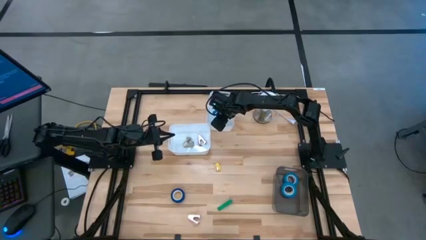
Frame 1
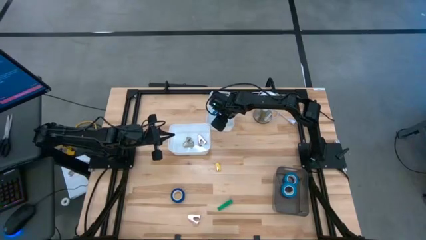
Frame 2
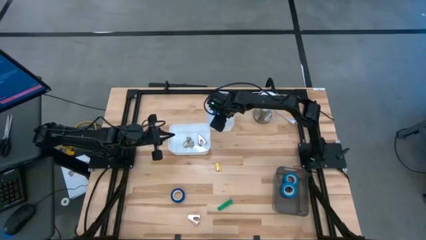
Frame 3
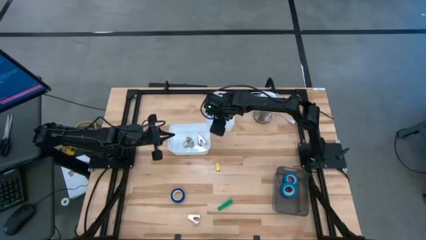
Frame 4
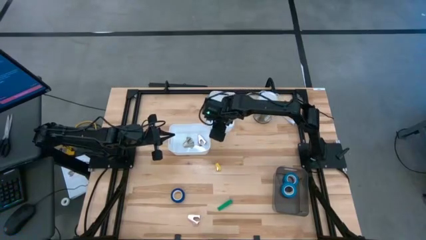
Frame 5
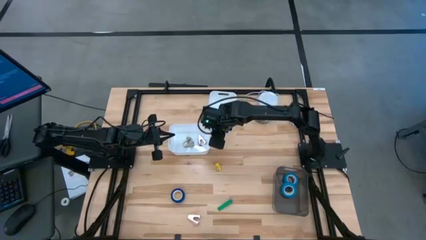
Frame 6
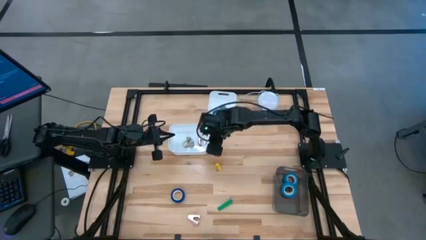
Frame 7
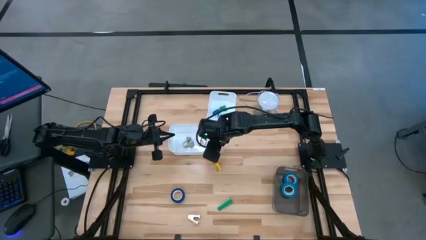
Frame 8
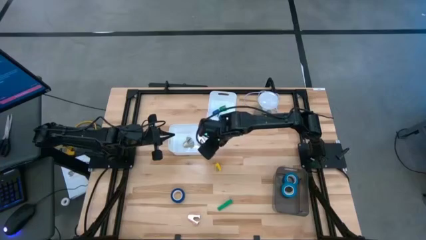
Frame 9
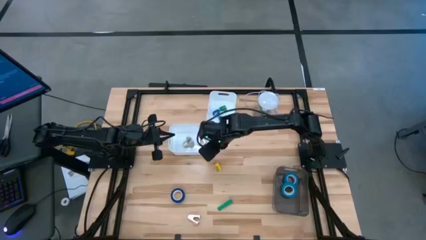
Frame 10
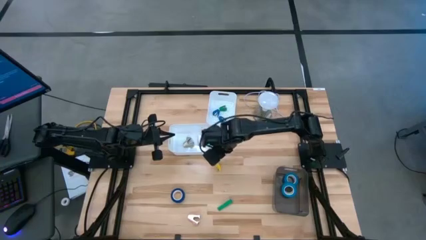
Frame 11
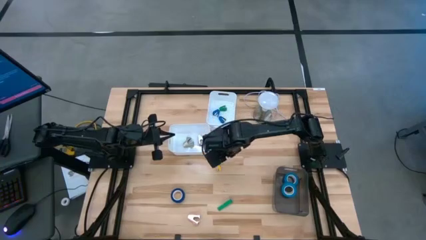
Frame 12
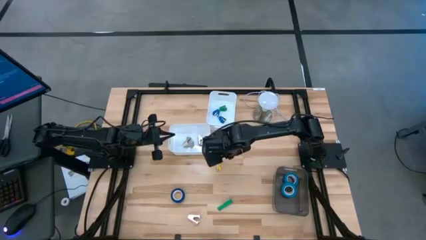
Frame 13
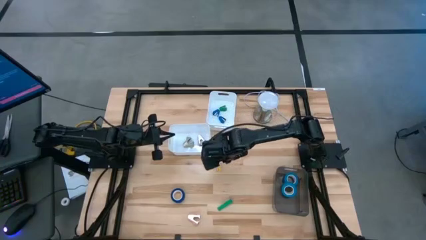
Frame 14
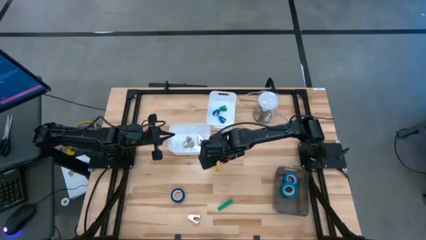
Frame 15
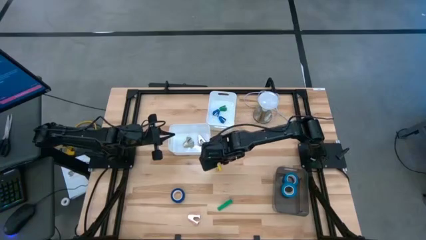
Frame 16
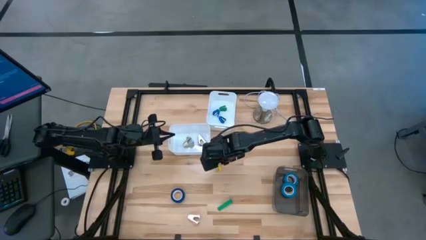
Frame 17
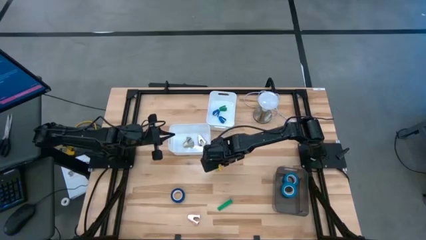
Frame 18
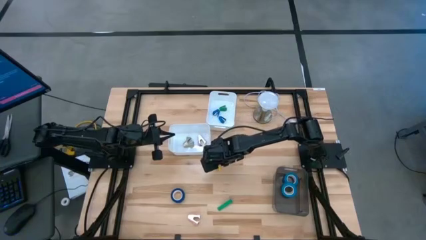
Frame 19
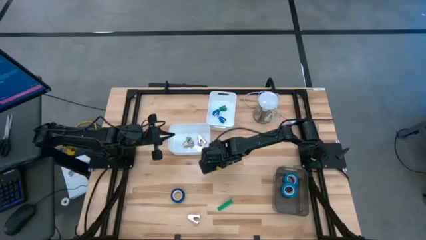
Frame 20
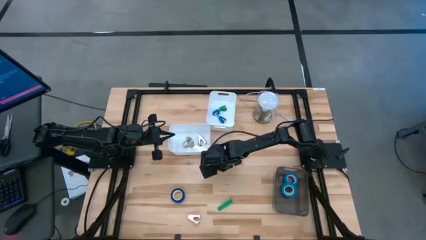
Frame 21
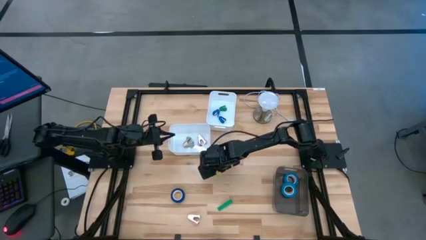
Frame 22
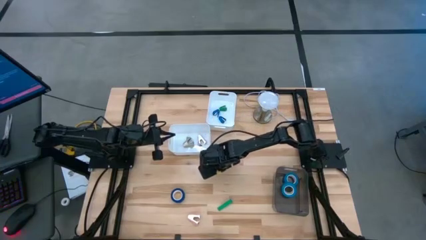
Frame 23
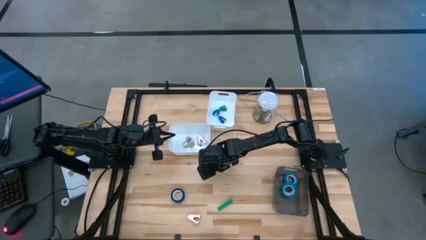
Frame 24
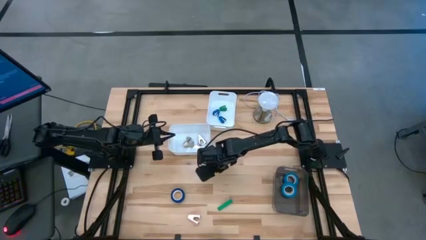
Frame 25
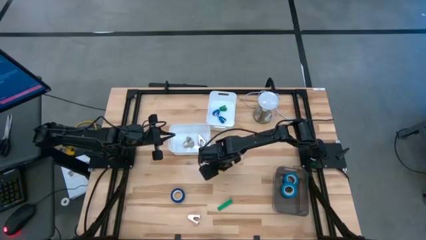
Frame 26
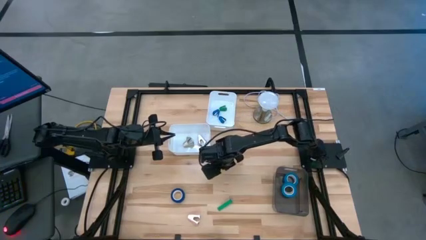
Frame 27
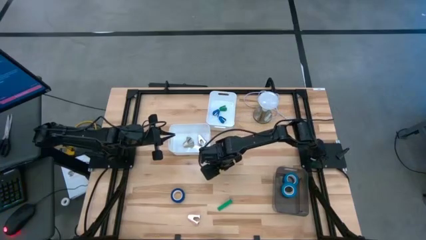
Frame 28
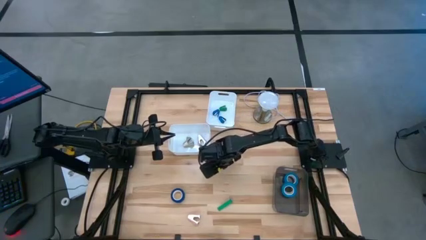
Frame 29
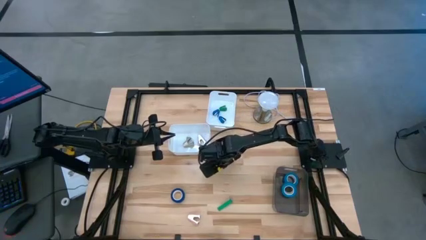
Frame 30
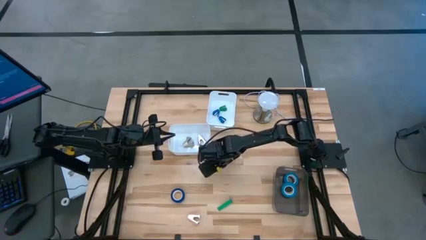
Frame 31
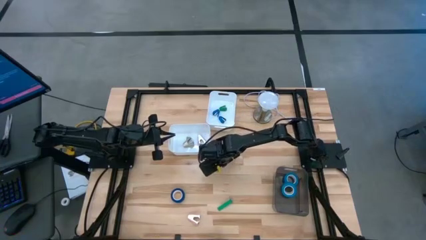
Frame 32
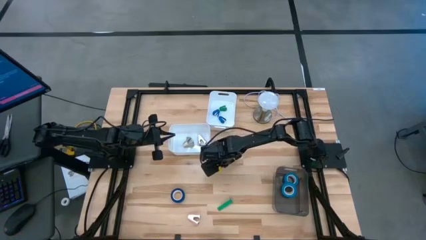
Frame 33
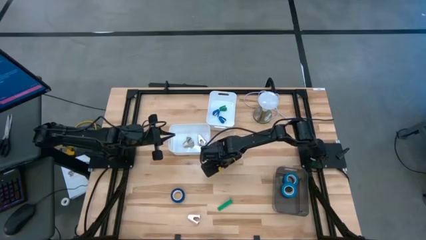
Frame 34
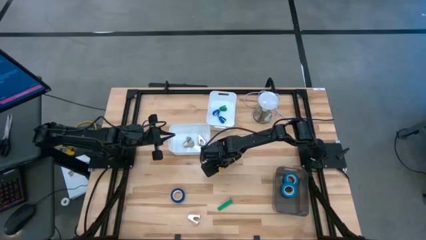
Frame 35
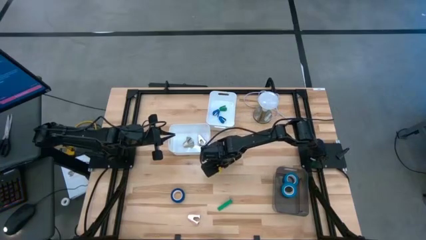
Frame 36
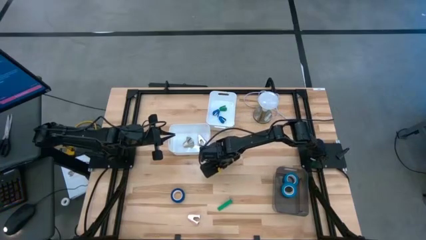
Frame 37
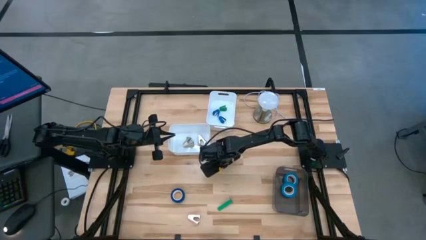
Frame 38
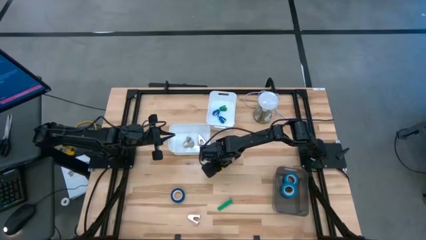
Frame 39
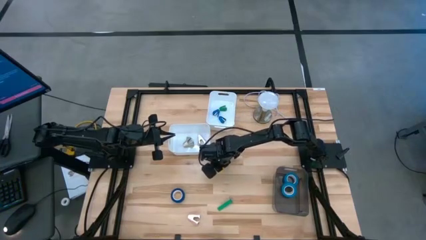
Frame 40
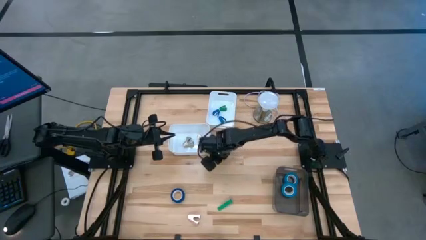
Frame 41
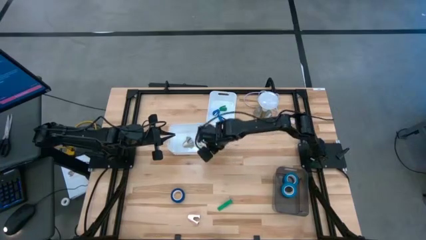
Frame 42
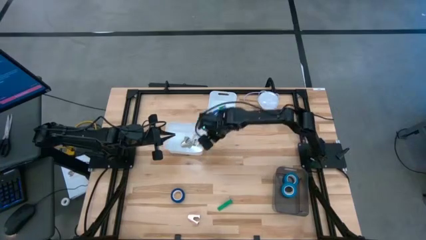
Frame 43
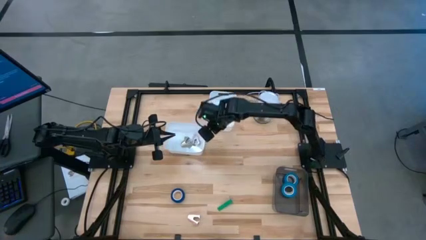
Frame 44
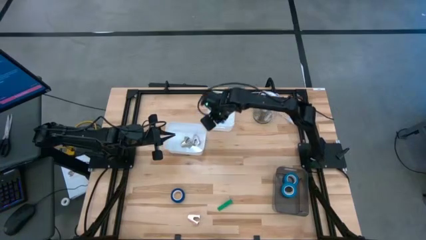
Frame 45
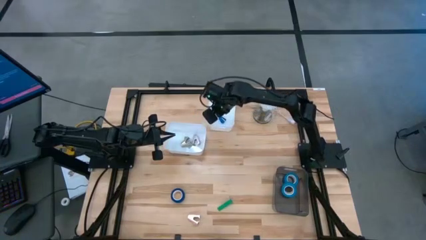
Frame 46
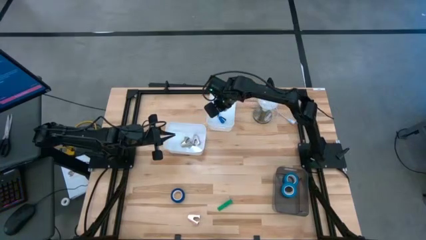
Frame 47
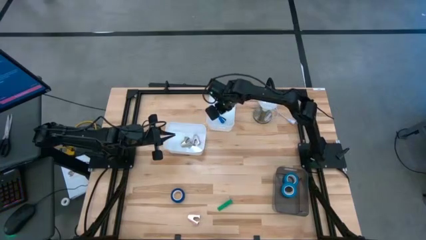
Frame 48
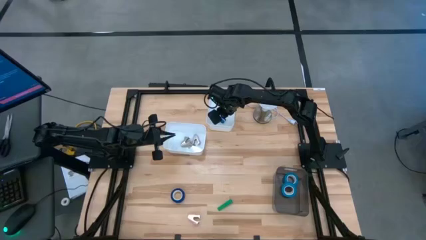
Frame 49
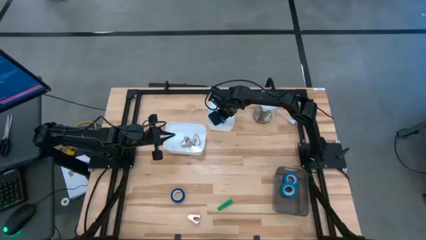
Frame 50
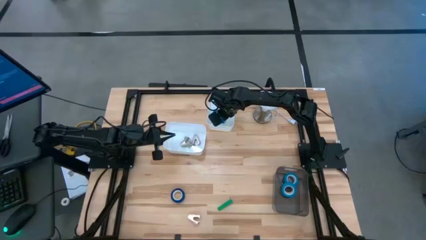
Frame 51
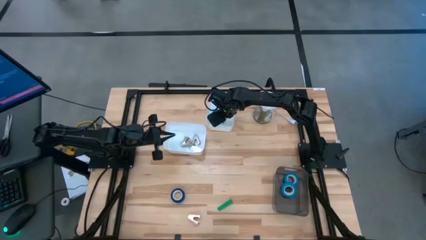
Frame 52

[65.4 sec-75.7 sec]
Task: Pick and place Stapler, Stapler remover, tape
Put the yellow stapler into the top white bin

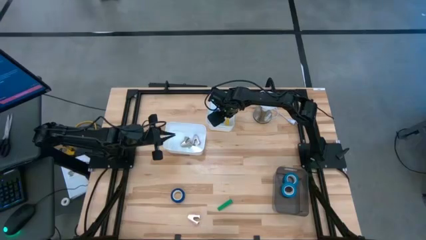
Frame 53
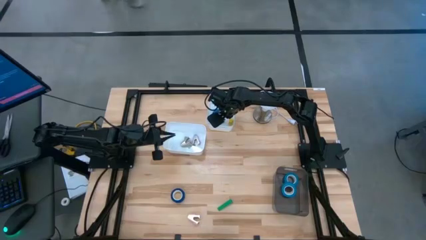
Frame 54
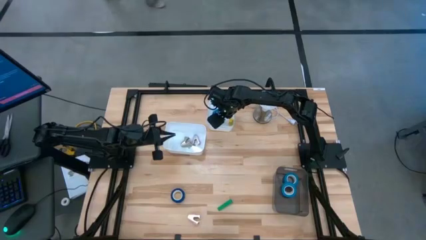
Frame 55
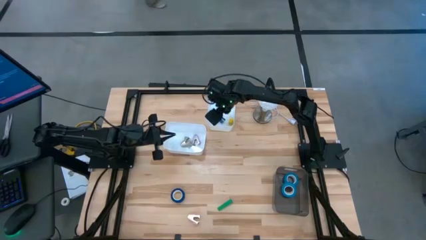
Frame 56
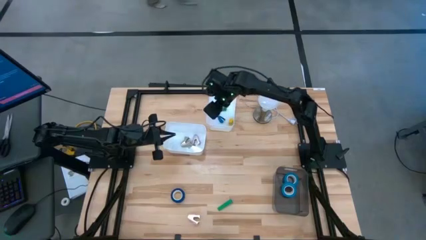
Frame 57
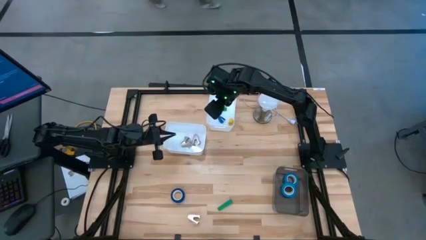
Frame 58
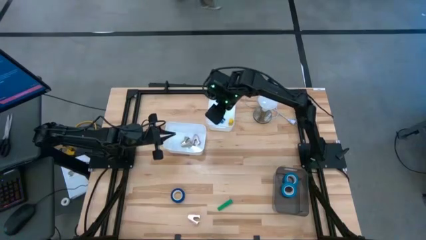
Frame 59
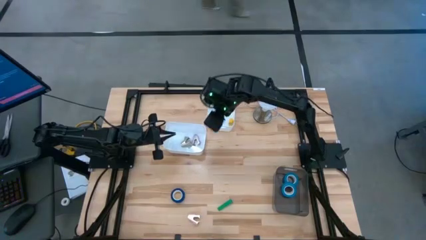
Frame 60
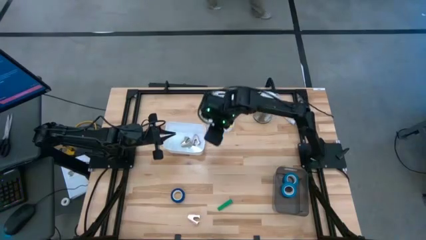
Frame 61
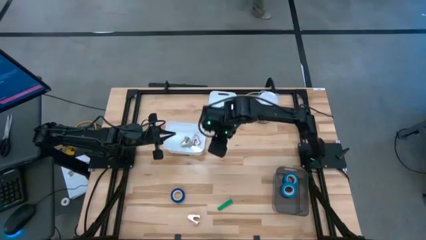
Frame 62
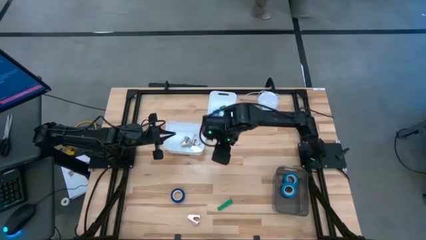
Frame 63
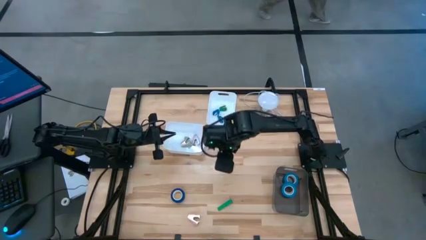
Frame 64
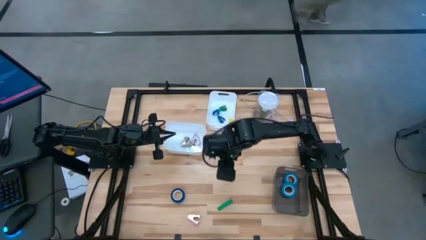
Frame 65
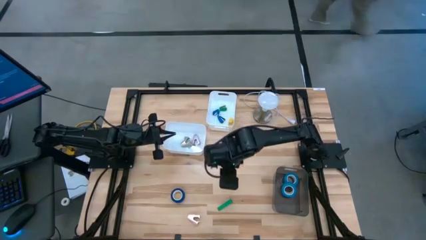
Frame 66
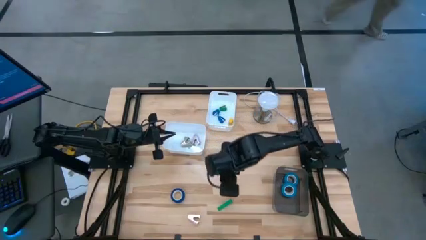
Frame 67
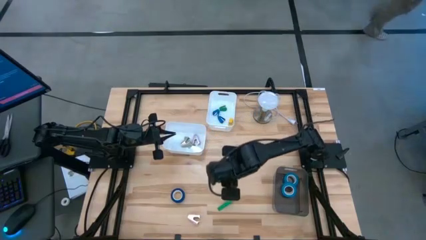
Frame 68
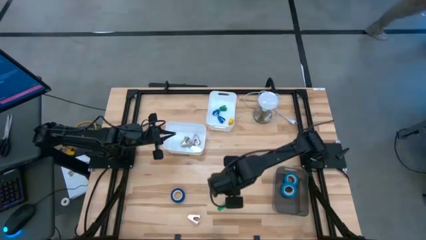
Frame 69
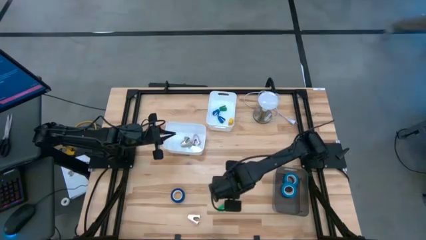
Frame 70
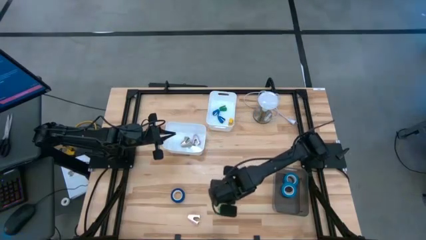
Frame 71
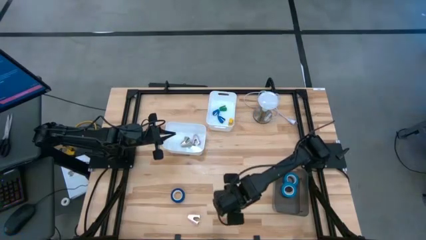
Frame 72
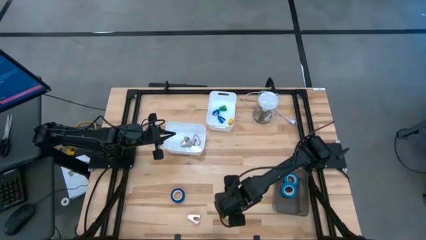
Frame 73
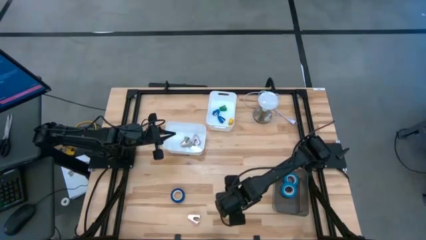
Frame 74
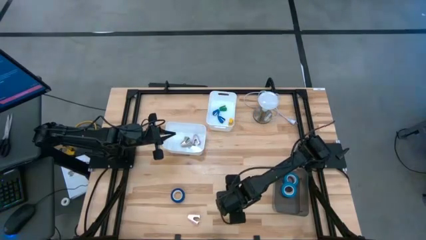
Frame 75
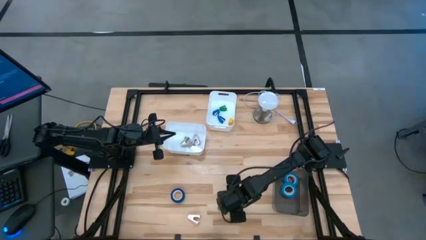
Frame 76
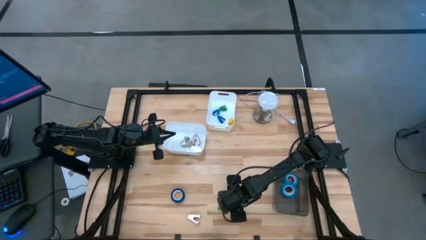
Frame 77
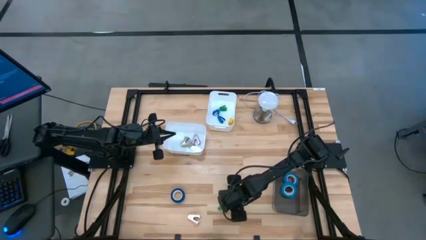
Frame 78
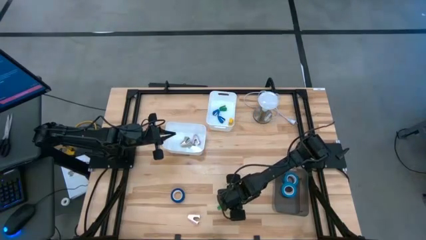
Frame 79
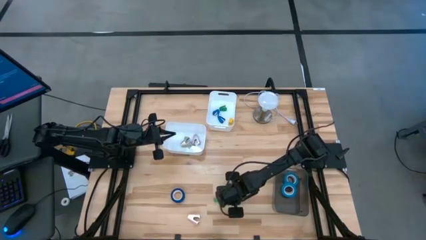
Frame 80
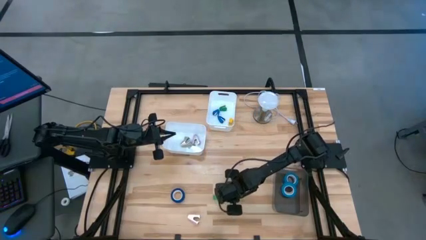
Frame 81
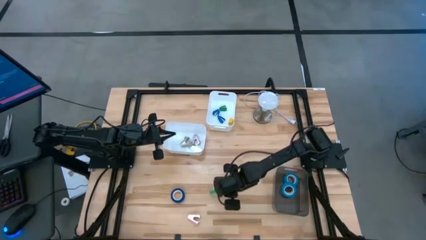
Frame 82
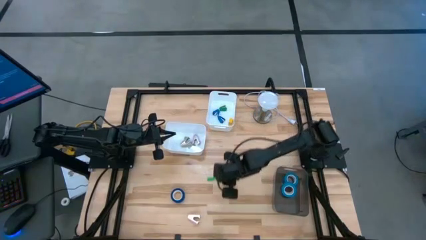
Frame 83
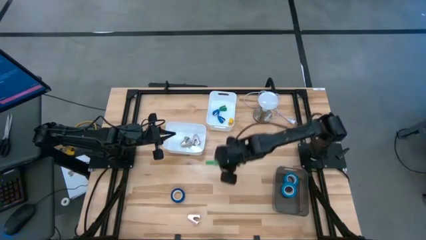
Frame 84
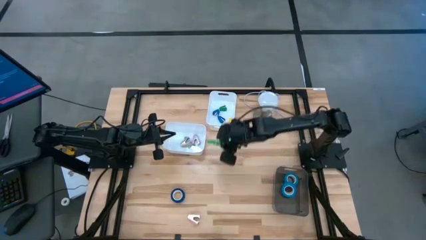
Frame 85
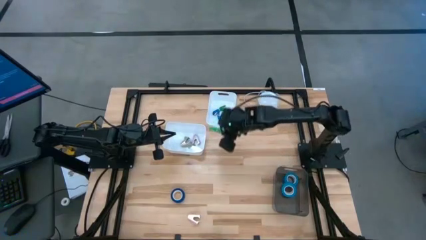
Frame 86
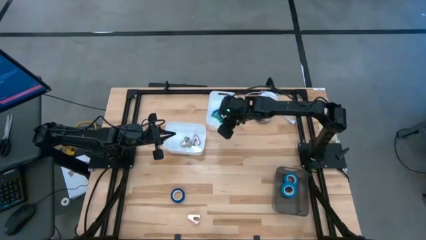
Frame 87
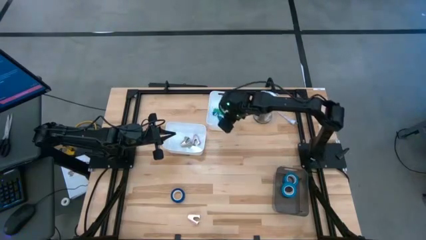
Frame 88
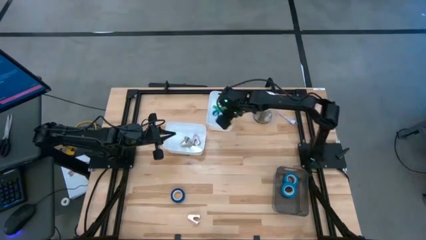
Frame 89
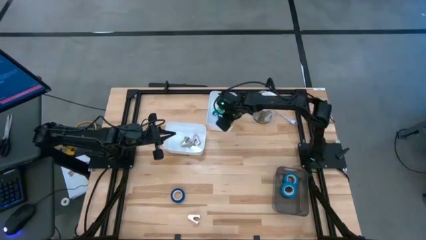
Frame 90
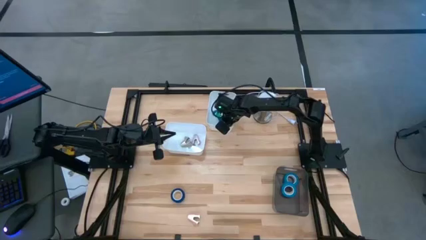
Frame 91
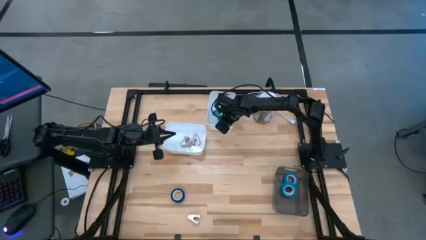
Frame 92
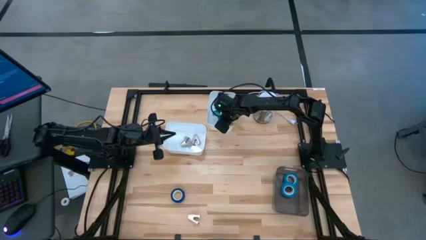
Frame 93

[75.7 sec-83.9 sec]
Put the green stapler into the top white bin
